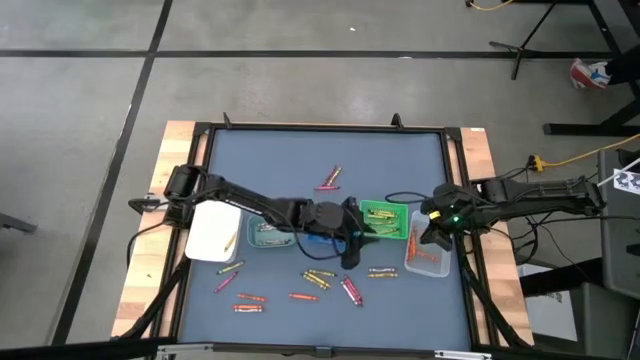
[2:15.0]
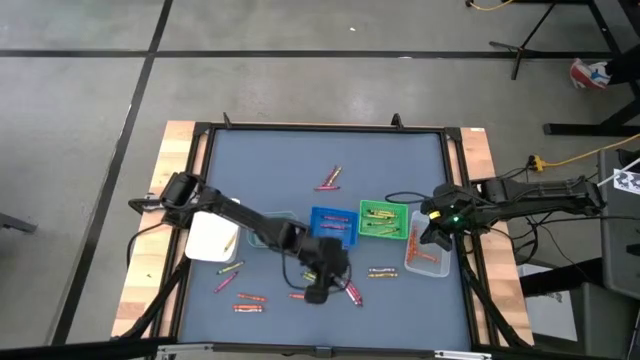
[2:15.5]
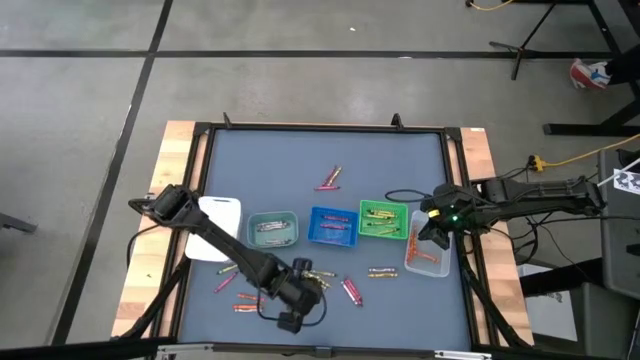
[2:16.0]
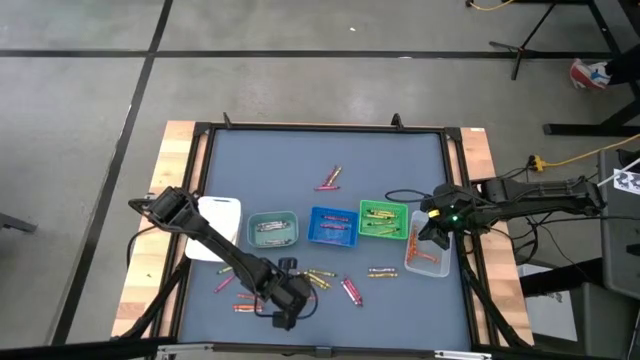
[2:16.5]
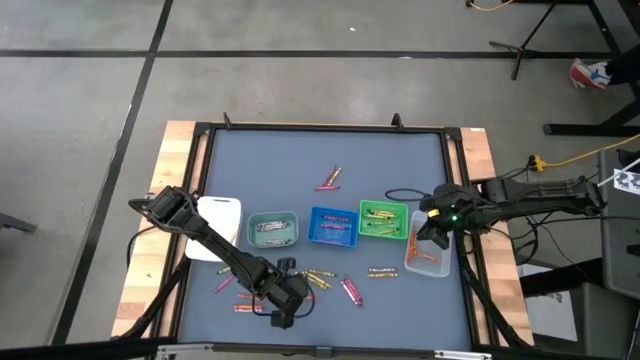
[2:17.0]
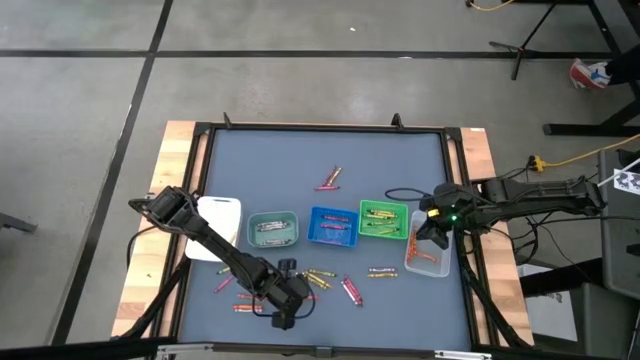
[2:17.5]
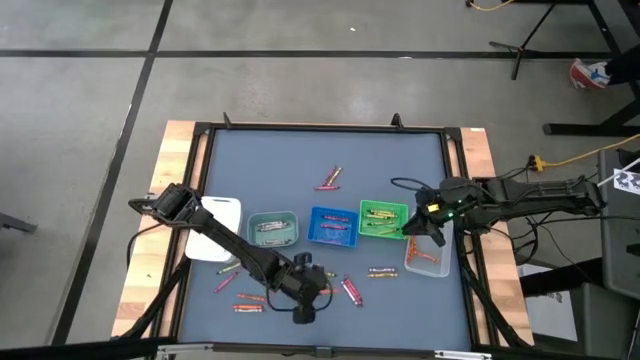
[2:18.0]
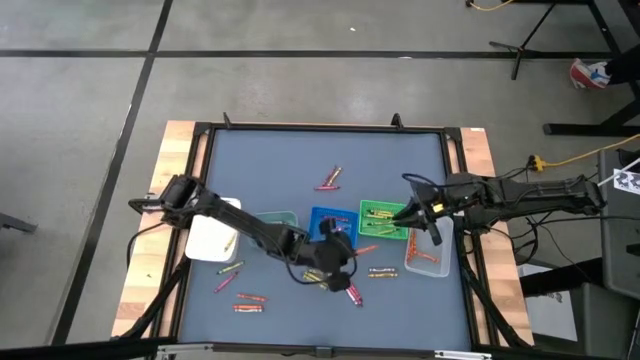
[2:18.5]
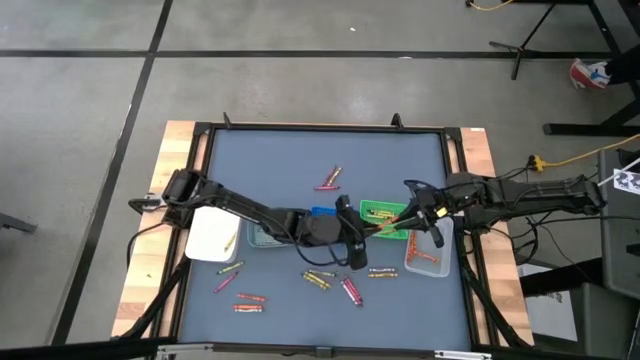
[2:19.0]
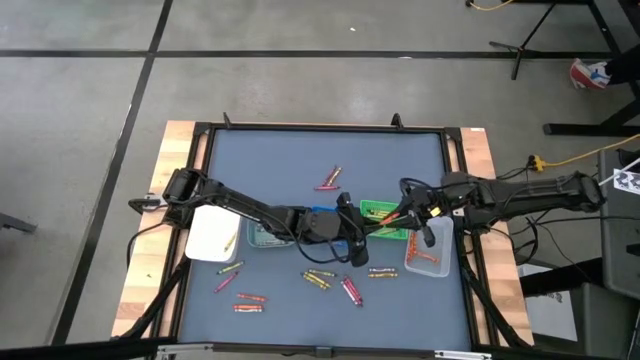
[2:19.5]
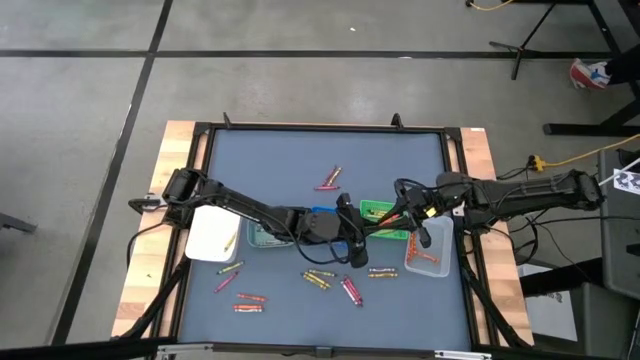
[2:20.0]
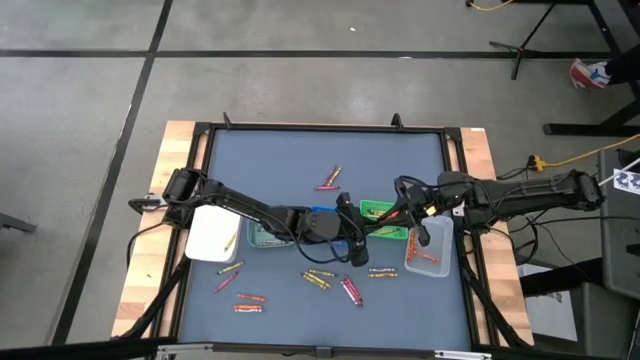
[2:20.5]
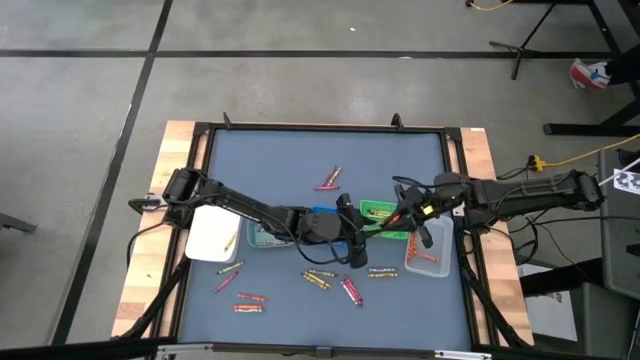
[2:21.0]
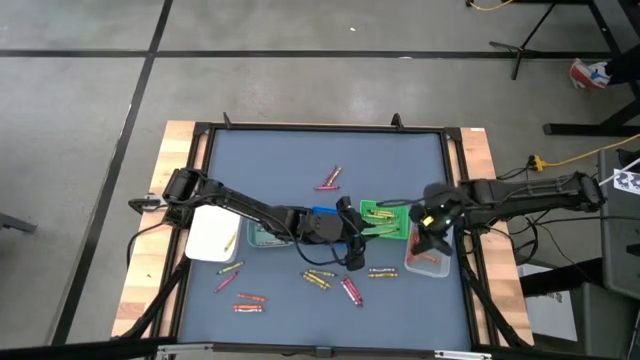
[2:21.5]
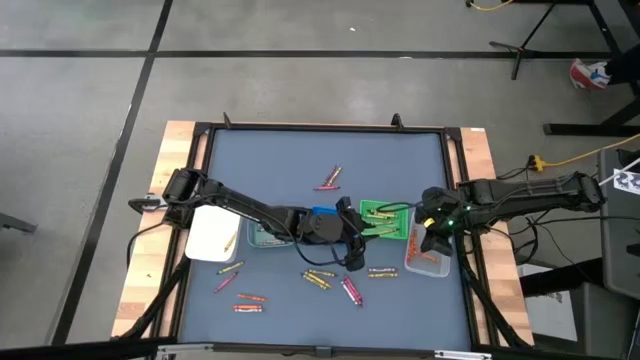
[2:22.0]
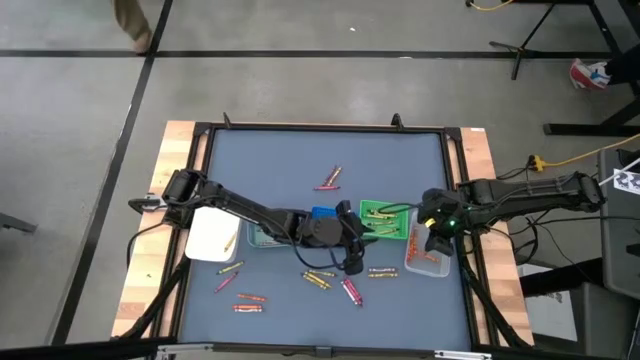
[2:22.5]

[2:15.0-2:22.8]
Task: Sort crayons
Put the orange crayon into the transparent bin

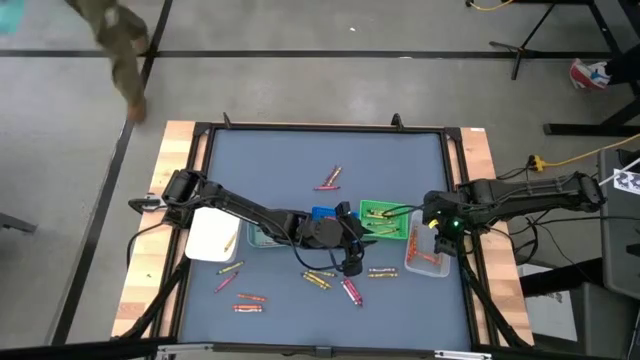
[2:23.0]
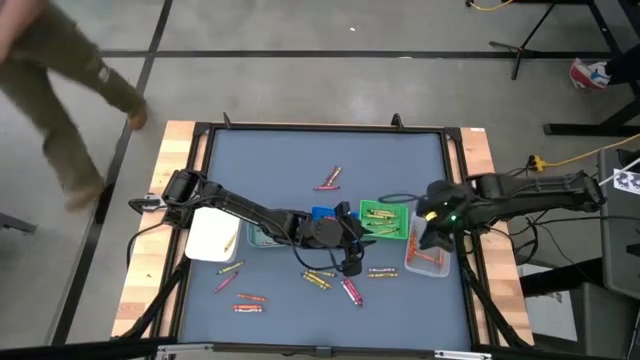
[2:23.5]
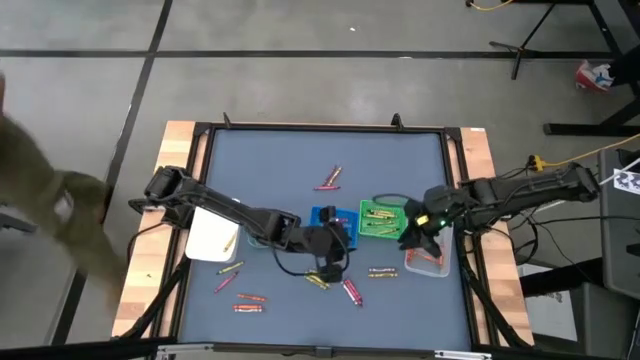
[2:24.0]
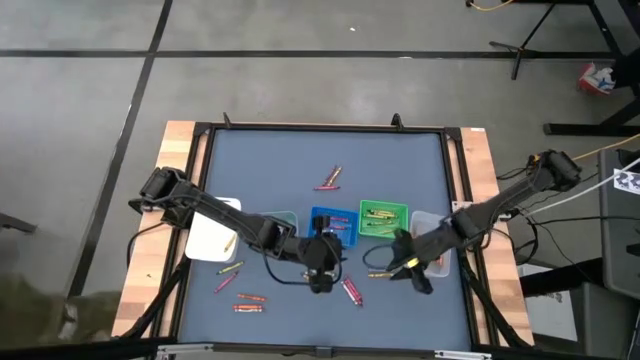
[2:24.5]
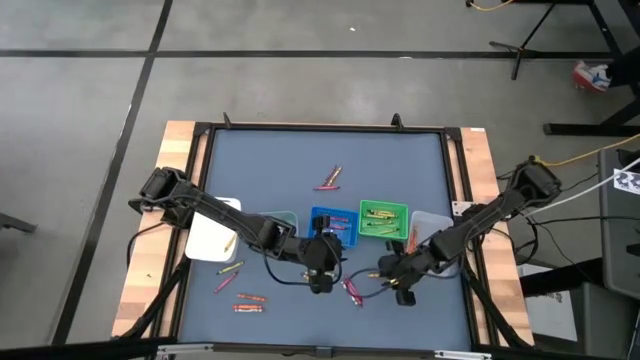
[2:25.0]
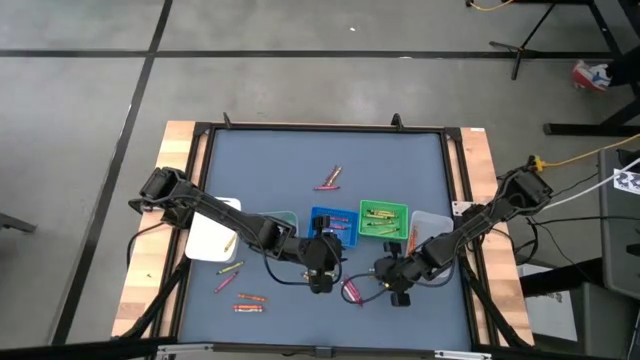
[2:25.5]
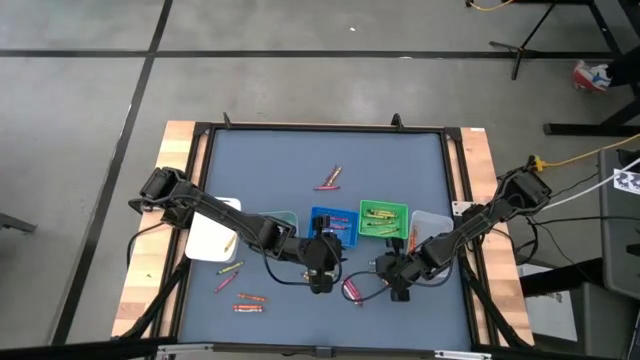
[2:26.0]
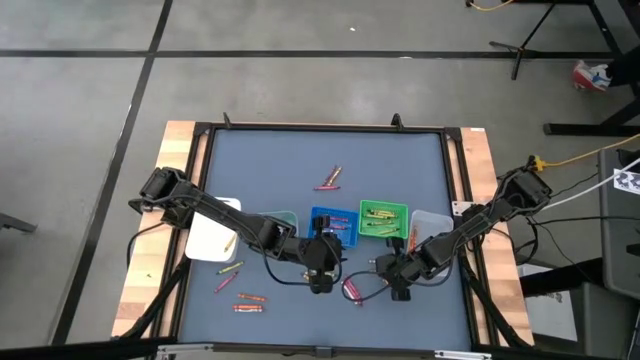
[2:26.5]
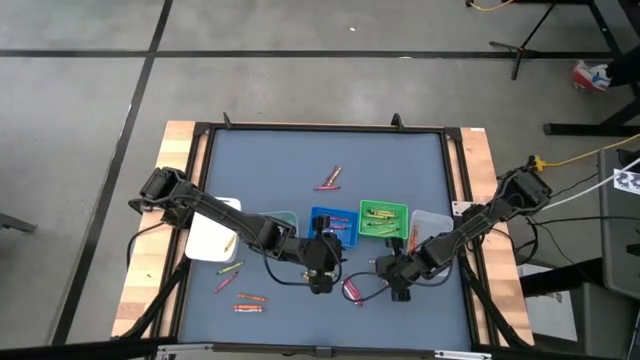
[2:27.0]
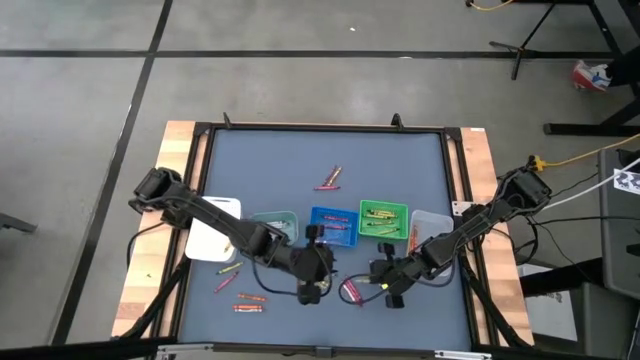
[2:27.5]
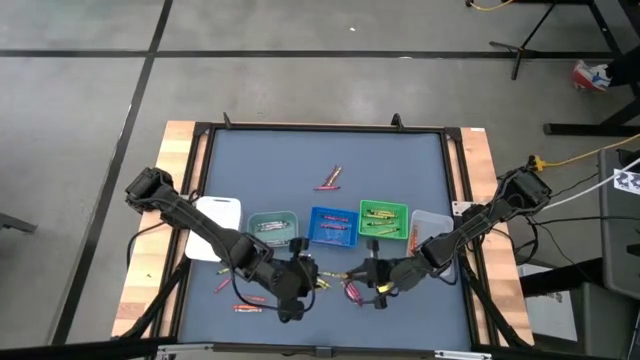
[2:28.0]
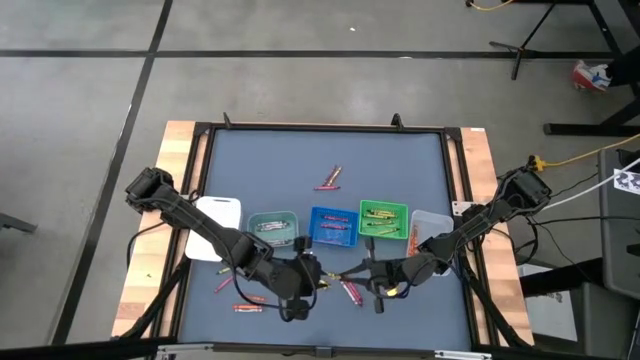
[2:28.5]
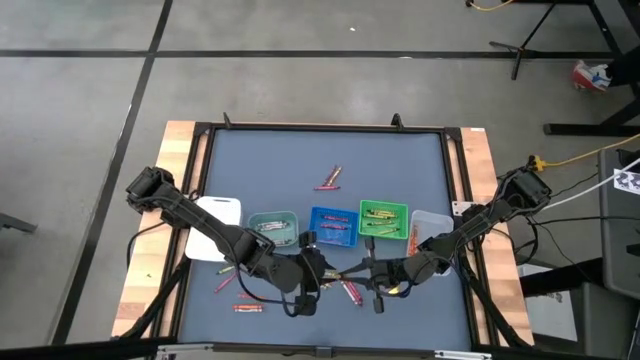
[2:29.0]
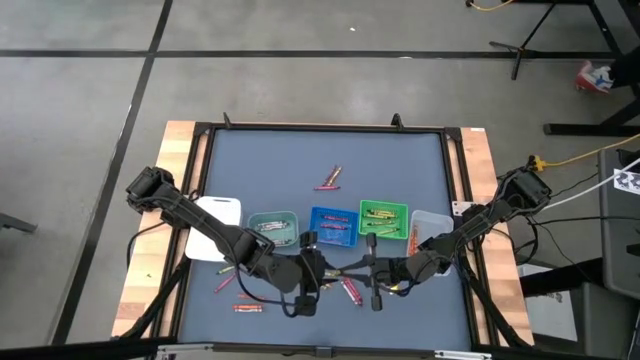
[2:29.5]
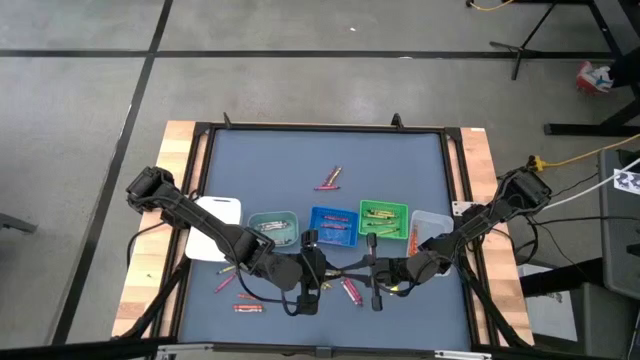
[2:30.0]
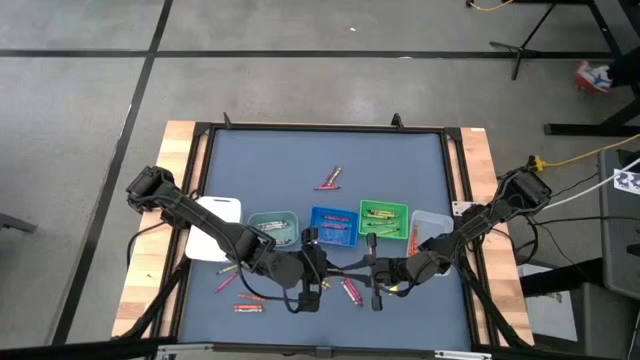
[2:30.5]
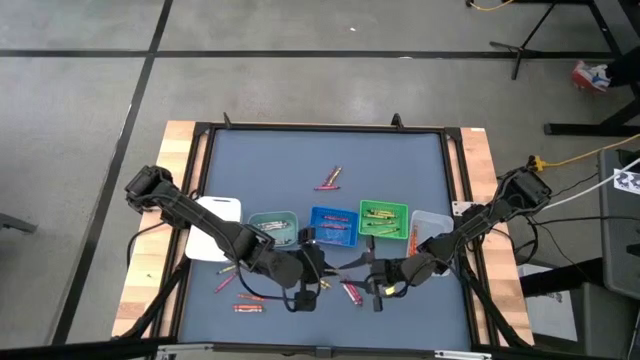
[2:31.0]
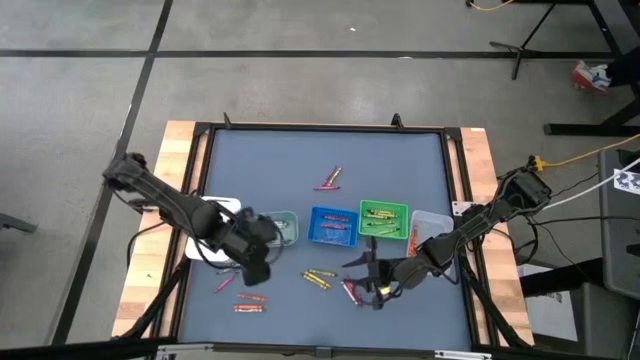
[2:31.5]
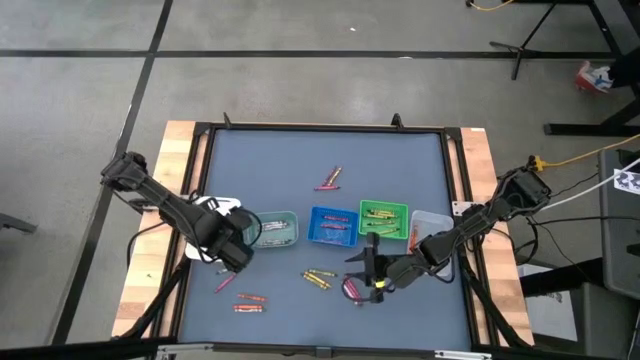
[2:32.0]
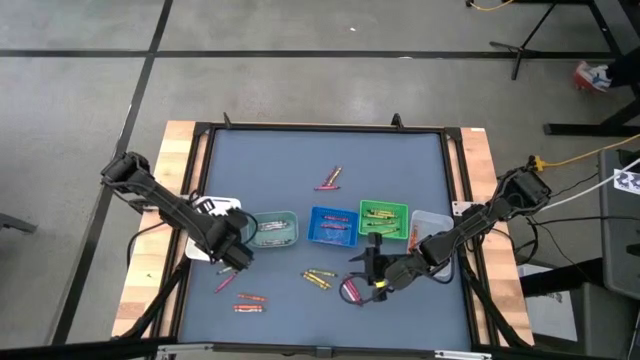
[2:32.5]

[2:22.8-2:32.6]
Put the yellow crayon into the white bin

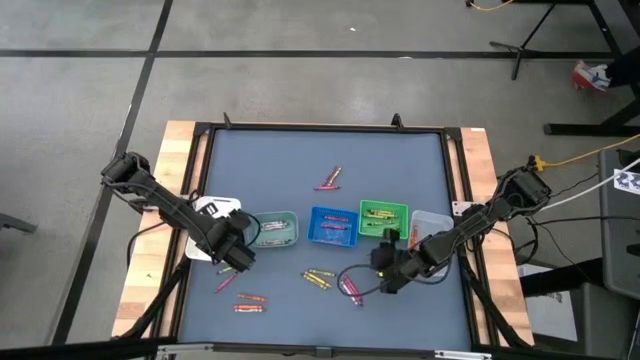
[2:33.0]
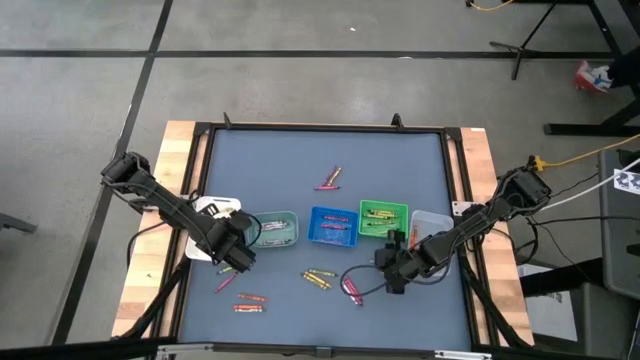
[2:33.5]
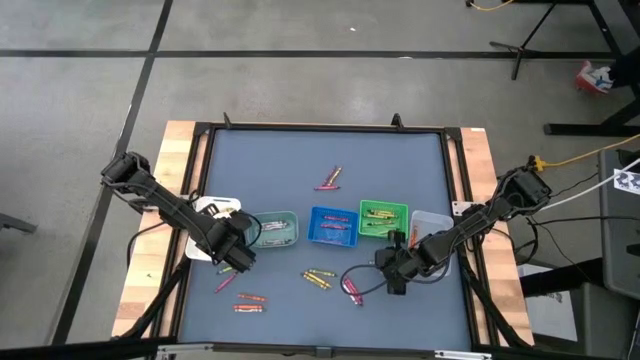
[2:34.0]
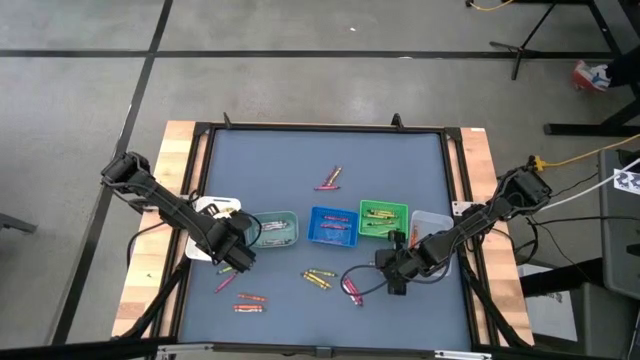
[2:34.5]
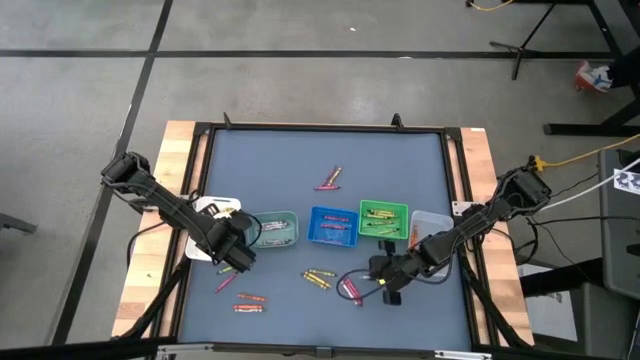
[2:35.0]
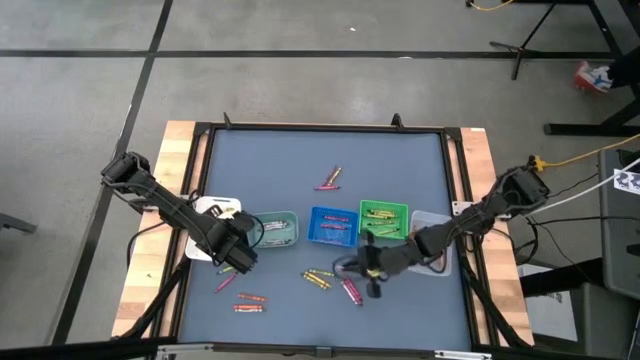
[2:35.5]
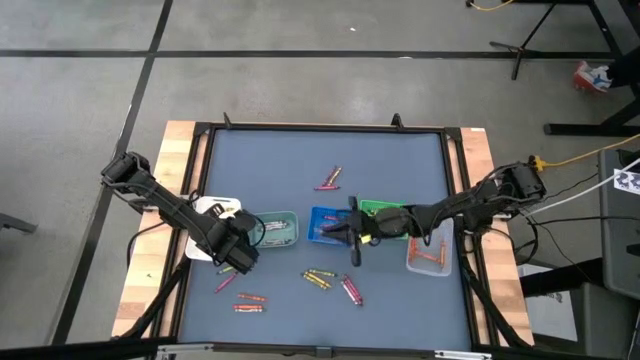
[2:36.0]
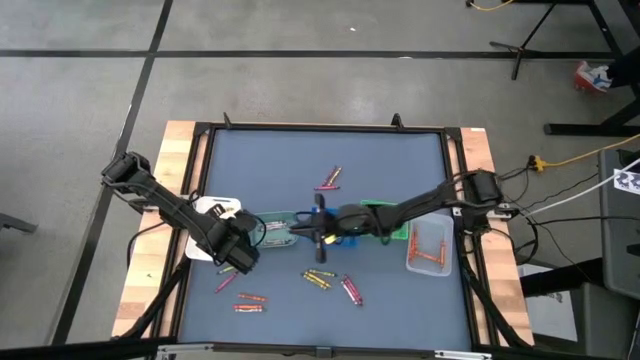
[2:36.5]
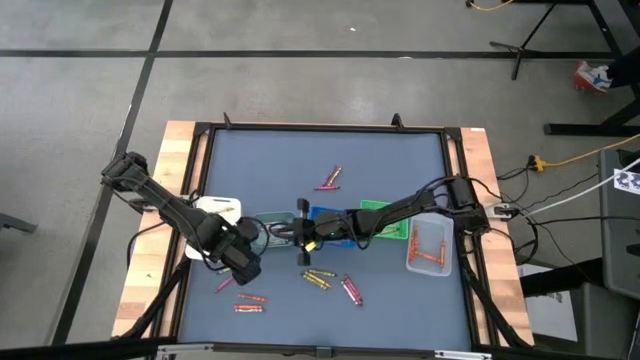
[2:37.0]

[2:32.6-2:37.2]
Put the gray crayon into the light green bin
